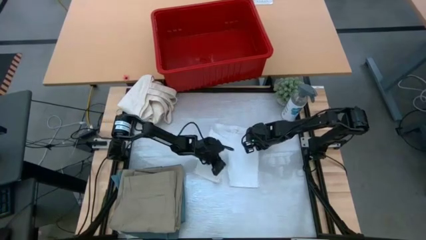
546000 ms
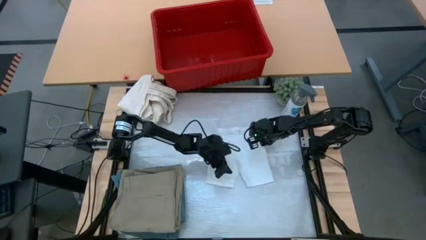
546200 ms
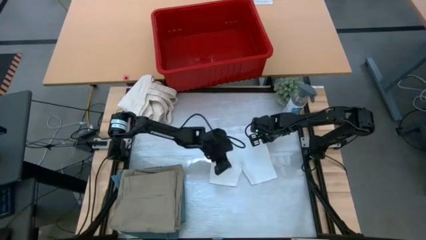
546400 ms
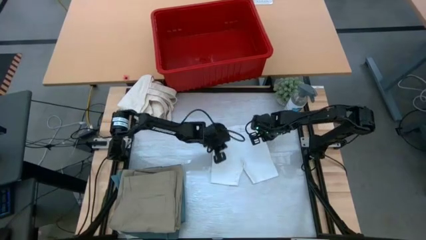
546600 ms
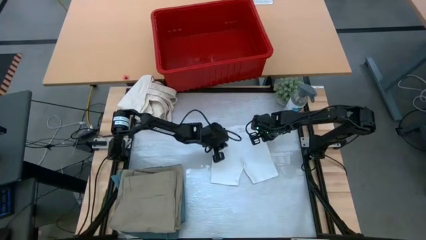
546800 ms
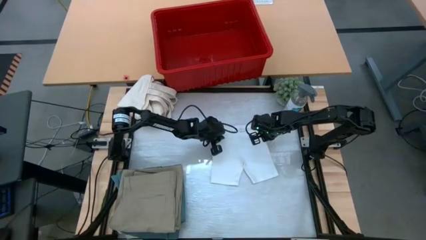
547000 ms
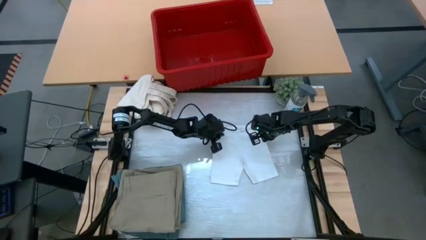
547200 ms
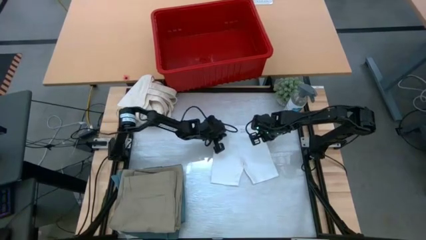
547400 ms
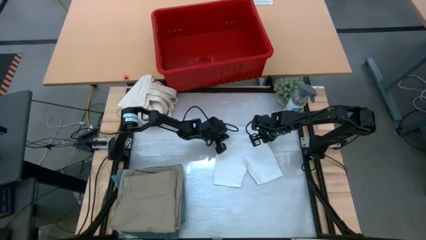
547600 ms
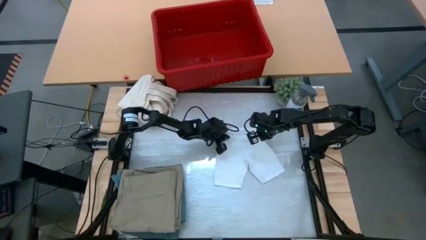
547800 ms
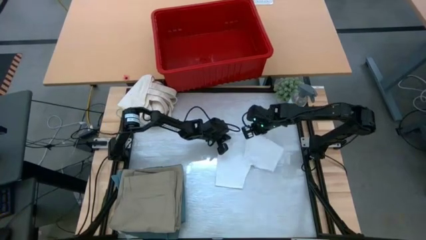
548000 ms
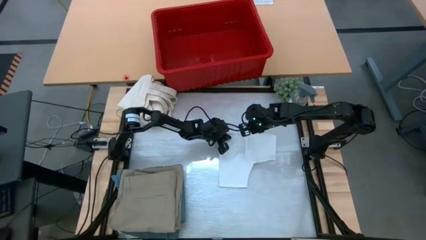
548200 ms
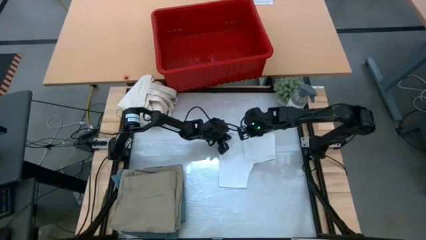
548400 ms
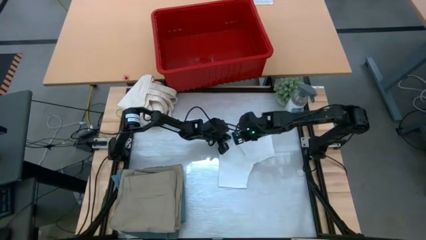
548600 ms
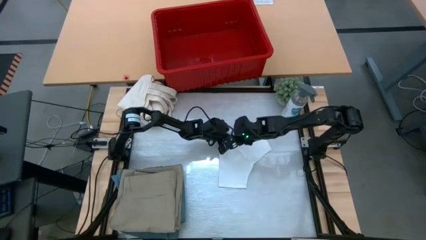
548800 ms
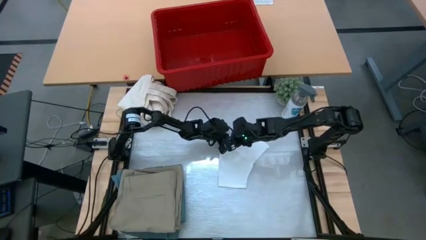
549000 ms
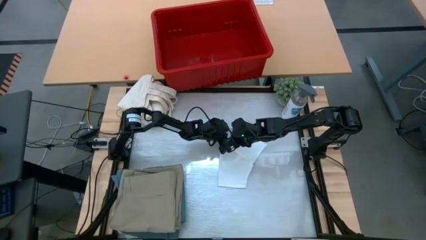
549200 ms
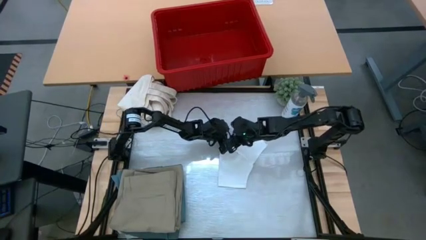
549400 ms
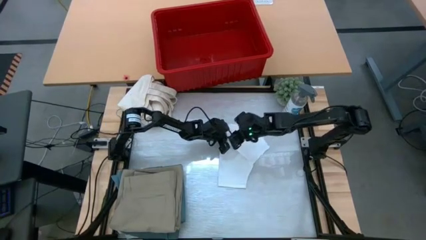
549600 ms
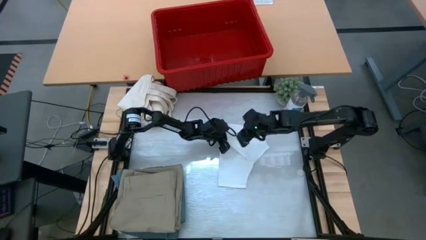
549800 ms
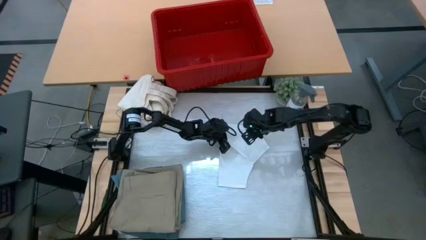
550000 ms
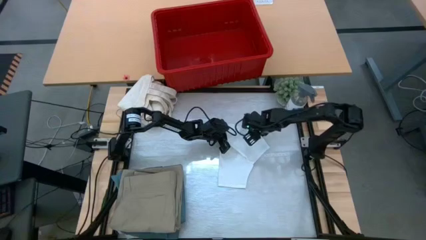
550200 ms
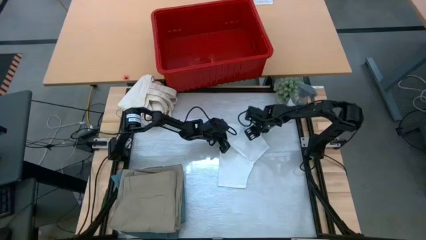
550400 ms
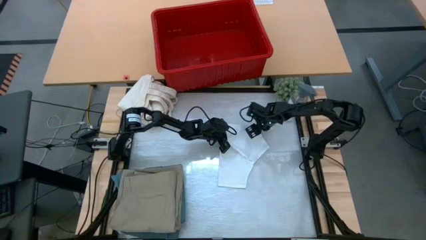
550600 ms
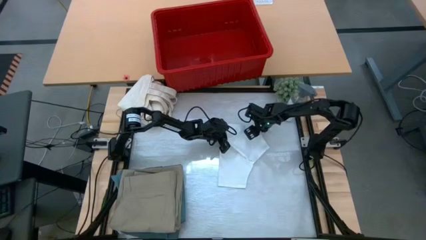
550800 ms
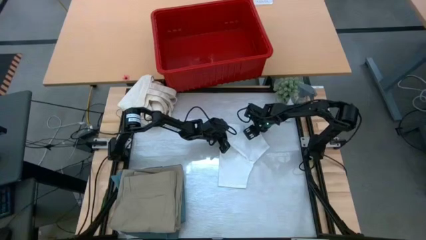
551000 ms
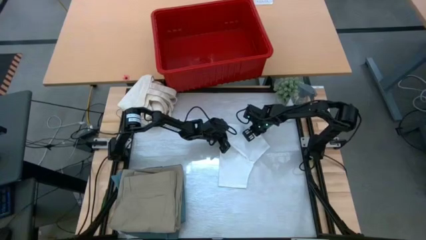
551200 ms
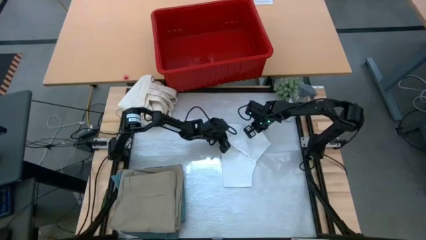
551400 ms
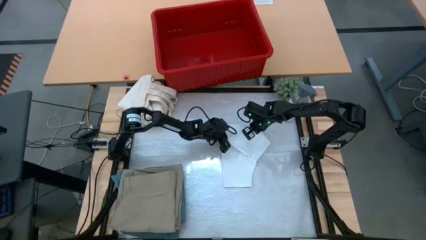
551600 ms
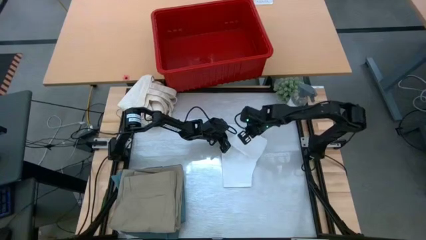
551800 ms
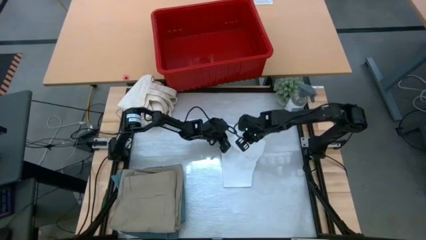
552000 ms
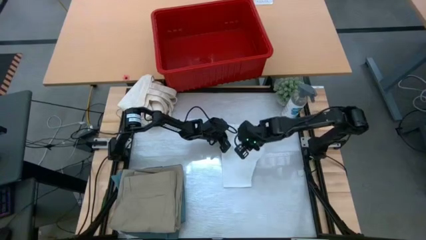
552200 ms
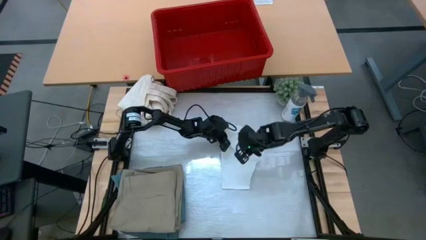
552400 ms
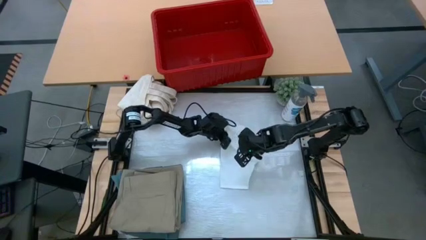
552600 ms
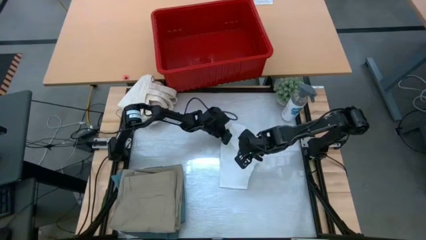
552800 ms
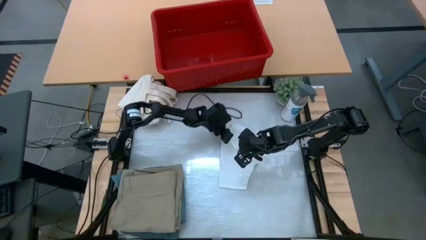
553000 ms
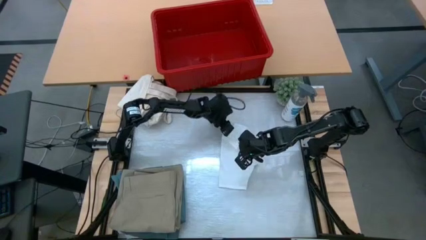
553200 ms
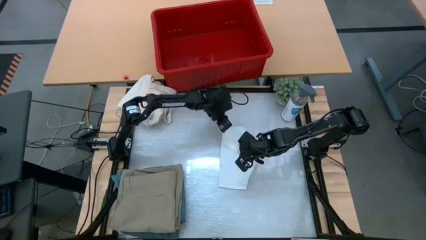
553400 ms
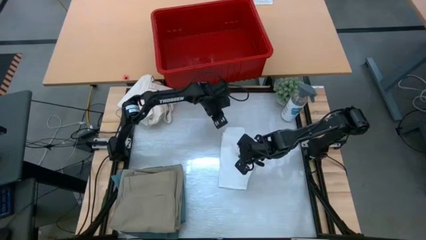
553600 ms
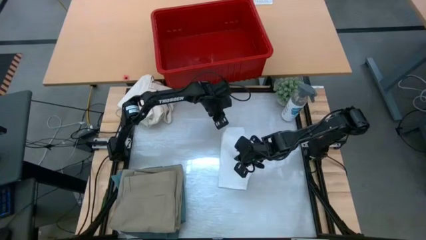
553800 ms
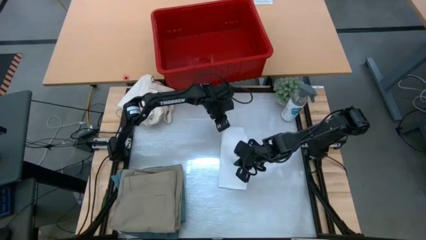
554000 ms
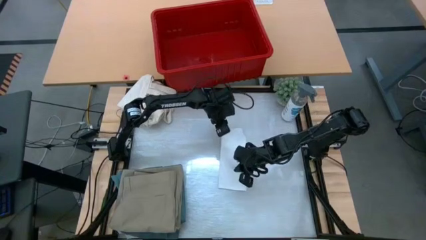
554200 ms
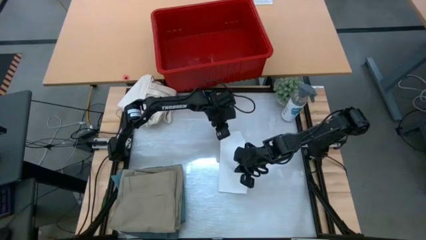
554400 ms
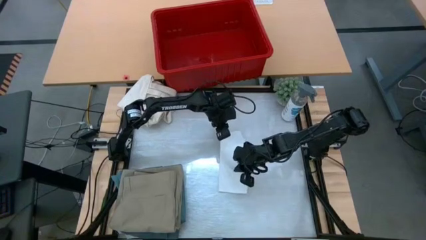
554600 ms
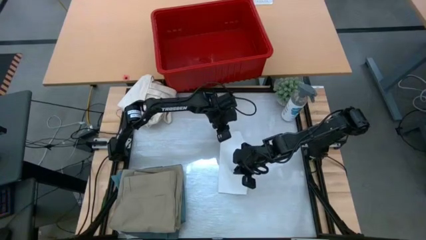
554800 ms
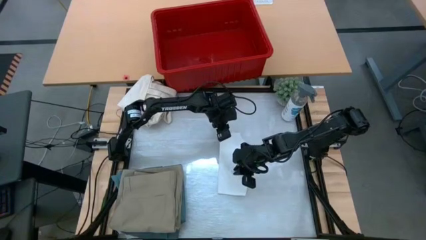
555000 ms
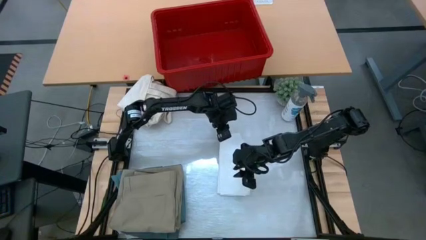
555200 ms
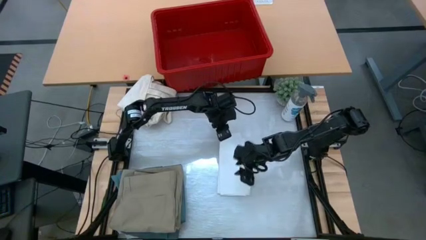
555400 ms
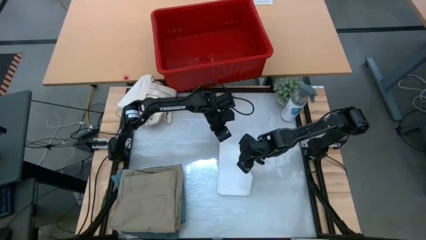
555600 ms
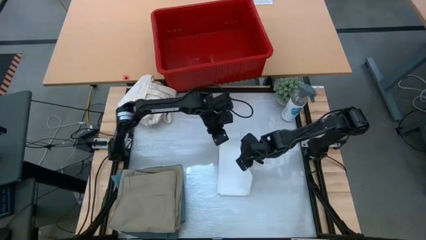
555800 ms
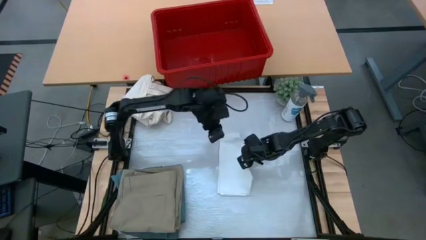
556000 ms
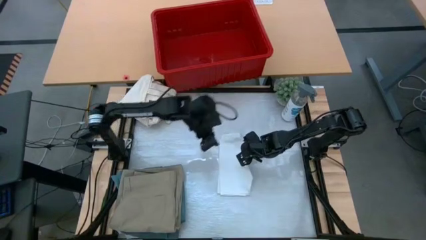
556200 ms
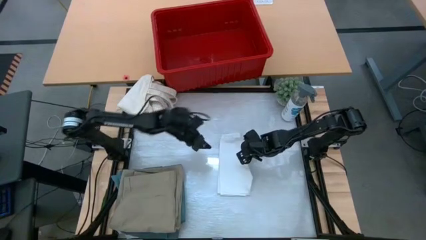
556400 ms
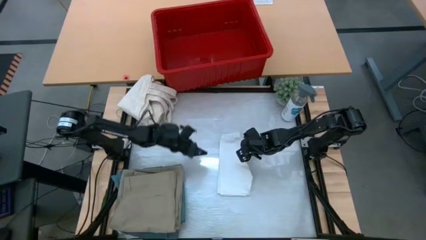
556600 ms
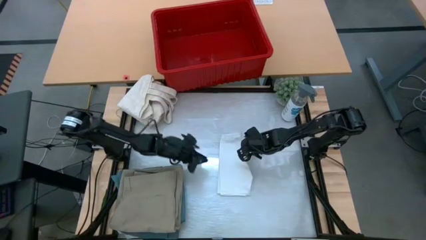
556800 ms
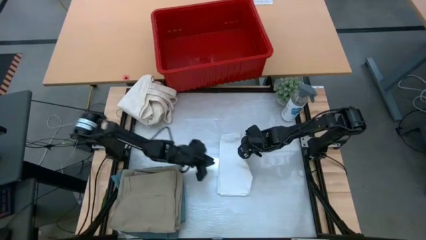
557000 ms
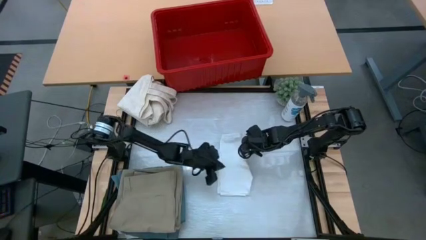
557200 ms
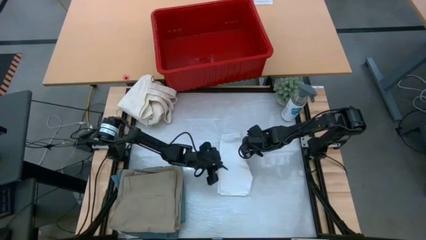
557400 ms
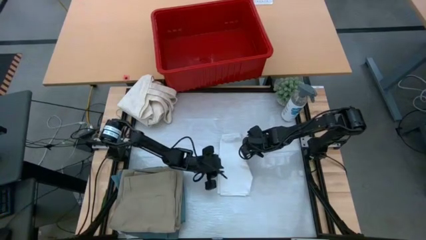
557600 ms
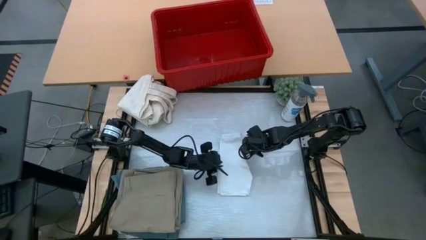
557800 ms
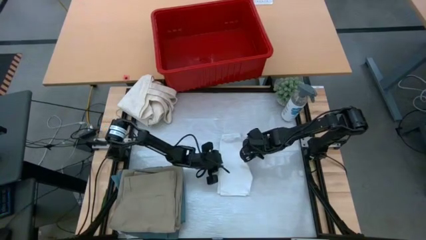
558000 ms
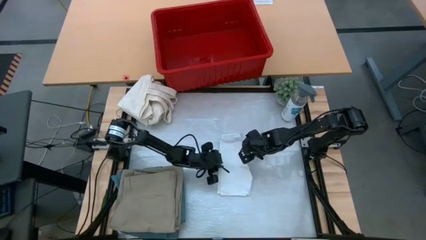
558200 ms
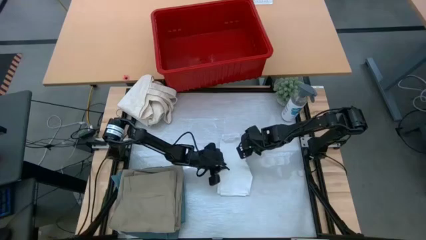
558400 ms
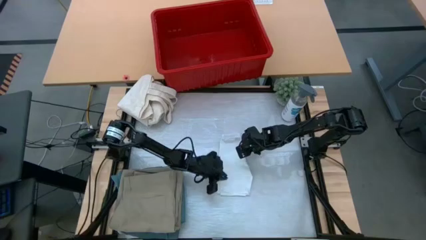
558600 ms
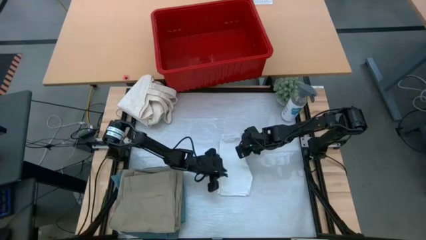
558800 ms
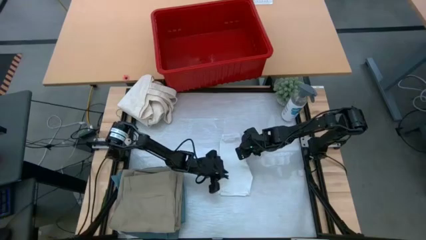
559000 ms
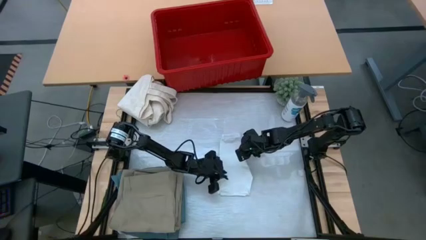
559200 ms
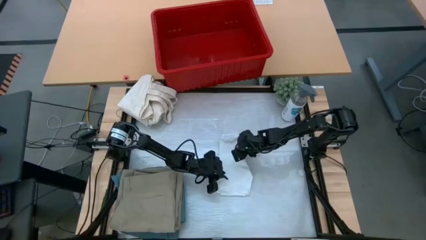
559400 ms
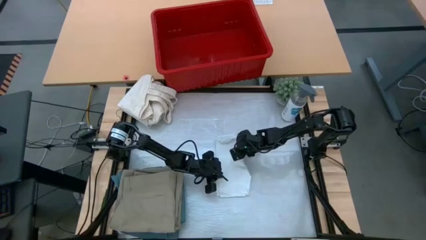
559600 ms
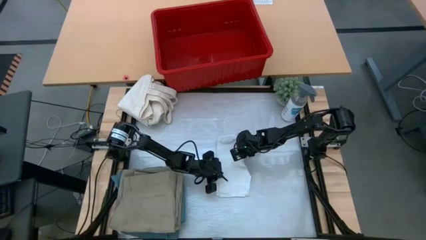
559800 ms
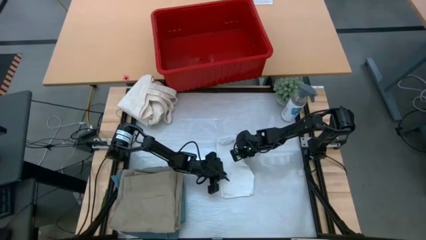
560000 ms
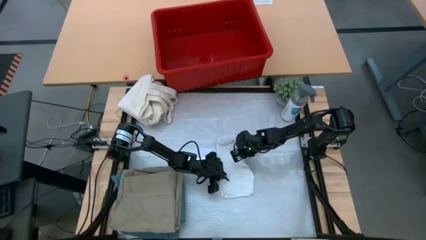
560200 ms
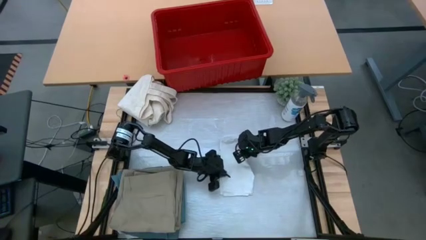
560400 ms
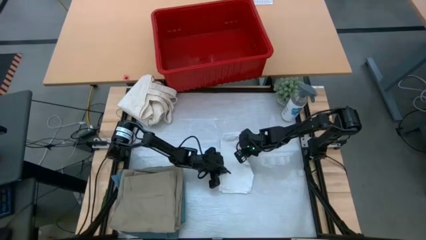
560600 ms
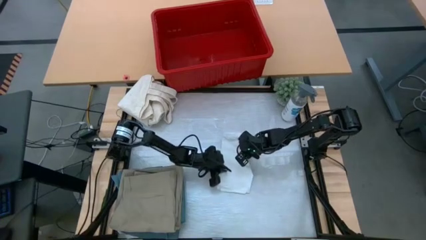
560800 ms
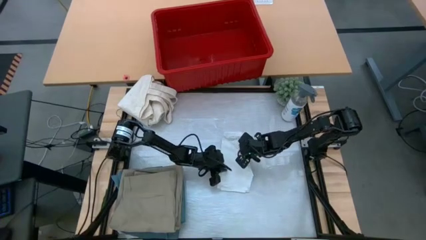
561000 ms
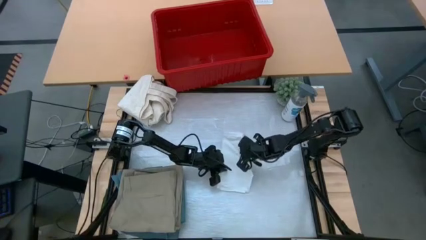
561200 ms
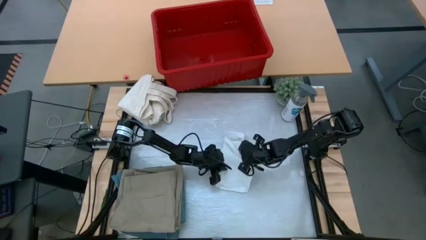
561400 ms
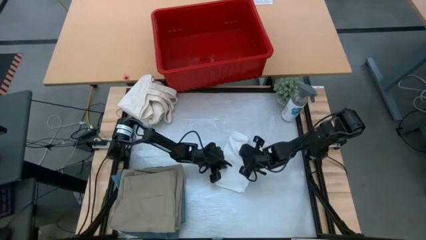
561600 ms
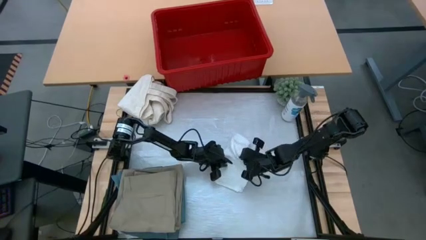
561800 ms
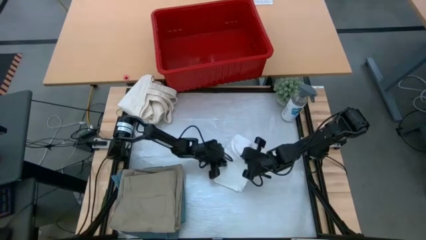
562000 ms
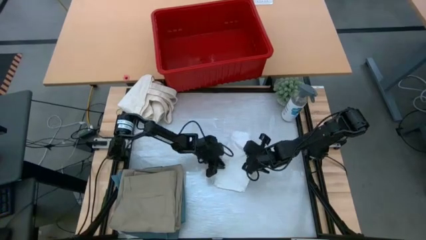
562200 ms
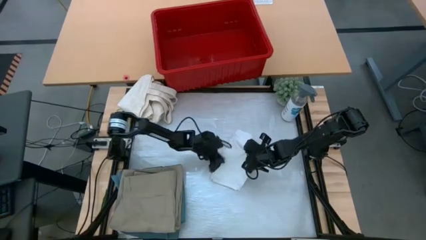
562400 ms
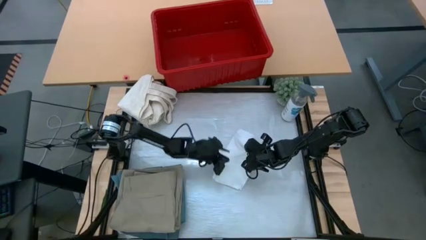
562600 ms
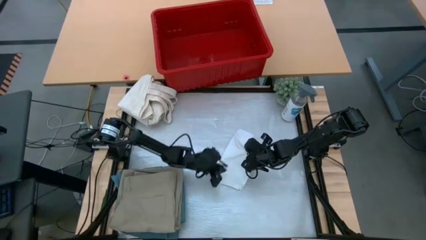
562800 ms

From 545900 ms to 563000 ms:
Task: Fold Laundry from Bin
Fold the white underwear
